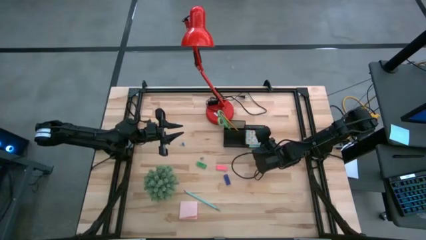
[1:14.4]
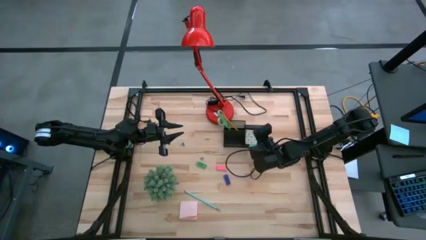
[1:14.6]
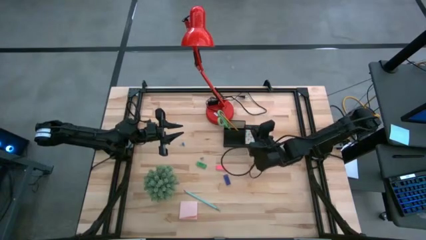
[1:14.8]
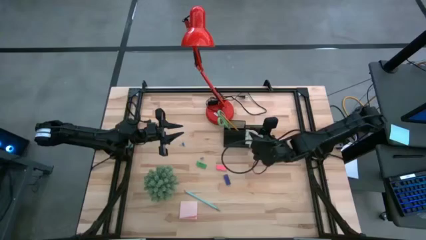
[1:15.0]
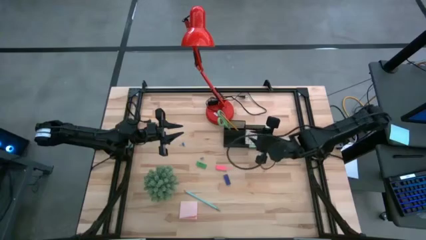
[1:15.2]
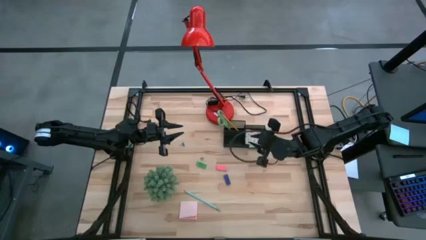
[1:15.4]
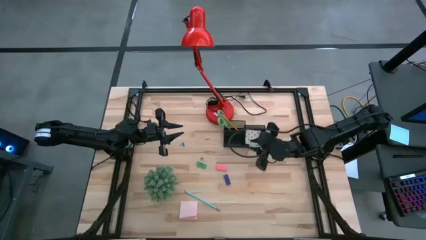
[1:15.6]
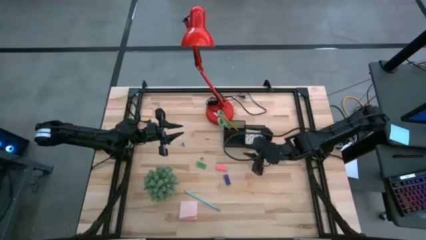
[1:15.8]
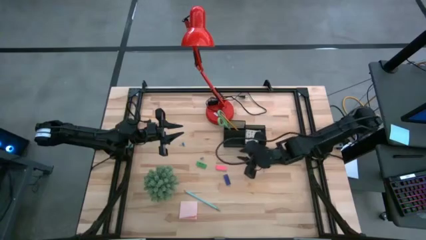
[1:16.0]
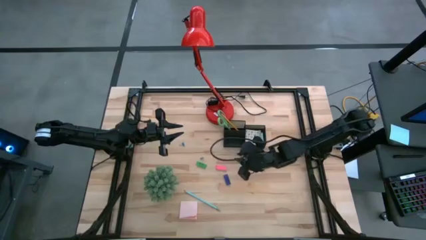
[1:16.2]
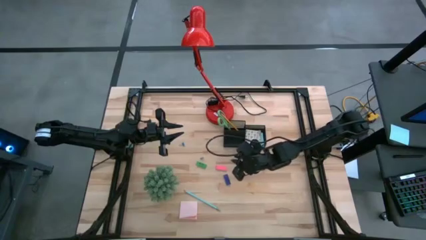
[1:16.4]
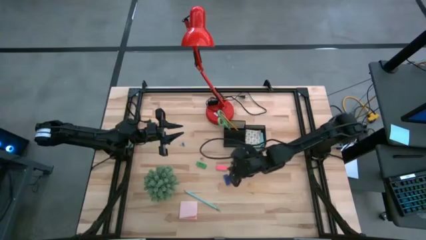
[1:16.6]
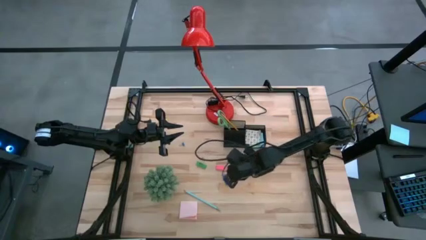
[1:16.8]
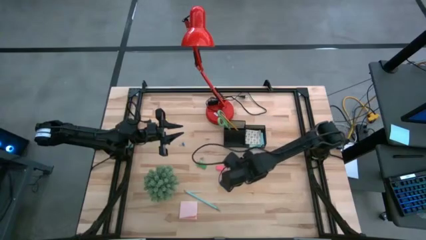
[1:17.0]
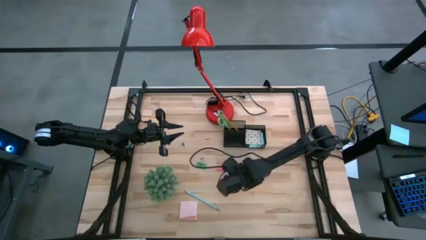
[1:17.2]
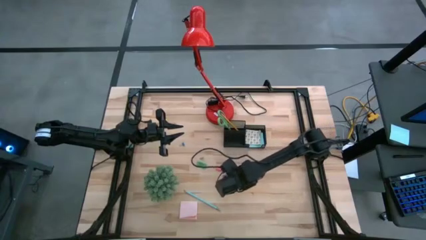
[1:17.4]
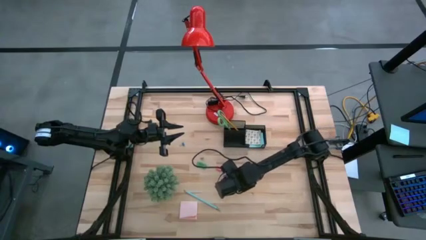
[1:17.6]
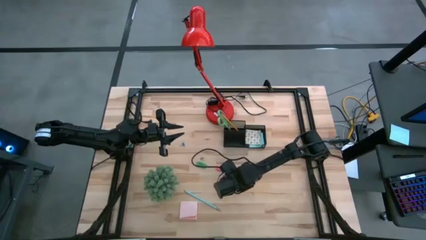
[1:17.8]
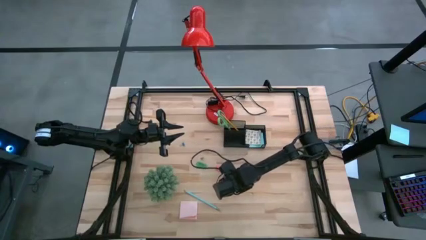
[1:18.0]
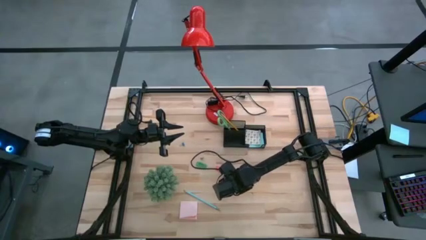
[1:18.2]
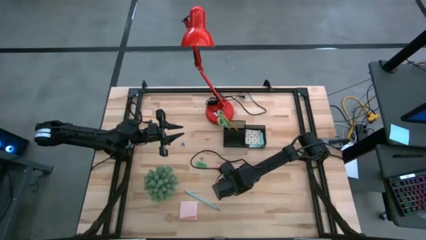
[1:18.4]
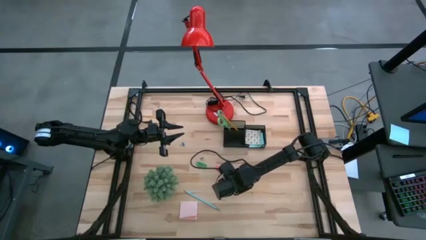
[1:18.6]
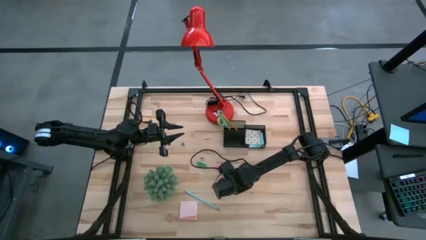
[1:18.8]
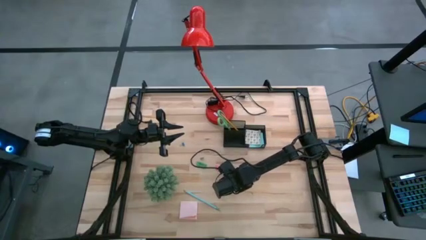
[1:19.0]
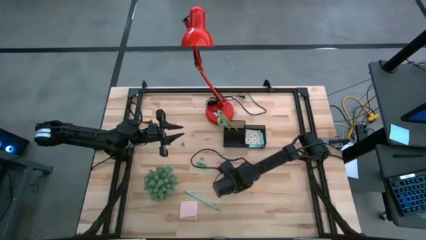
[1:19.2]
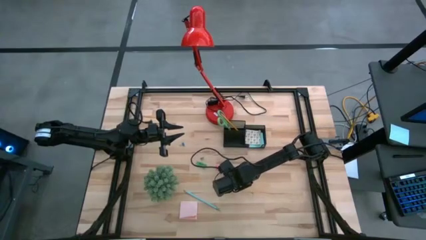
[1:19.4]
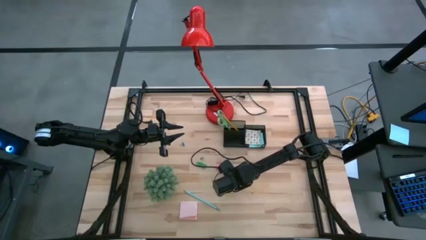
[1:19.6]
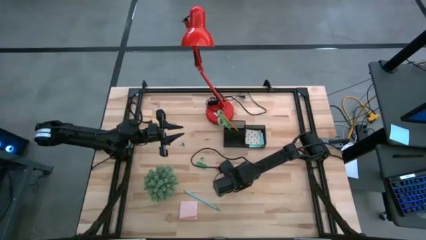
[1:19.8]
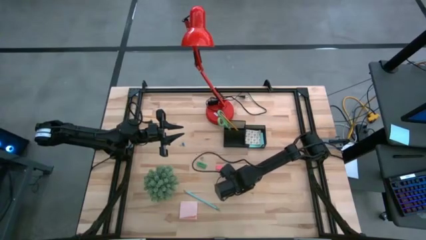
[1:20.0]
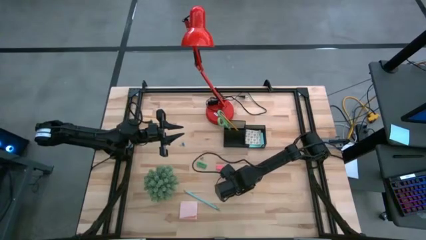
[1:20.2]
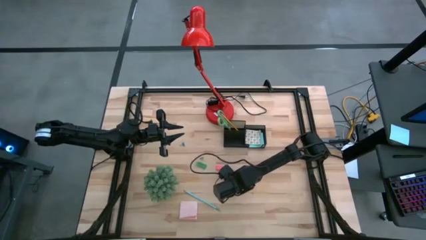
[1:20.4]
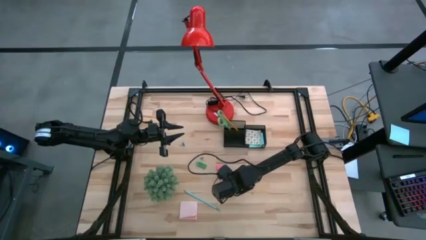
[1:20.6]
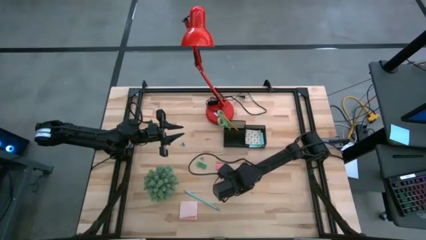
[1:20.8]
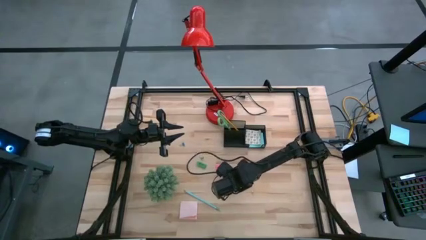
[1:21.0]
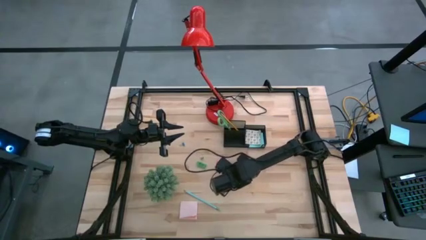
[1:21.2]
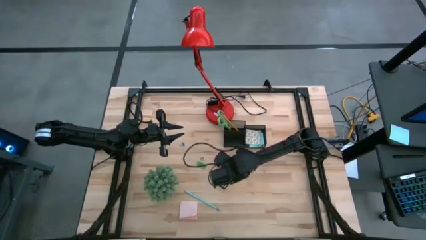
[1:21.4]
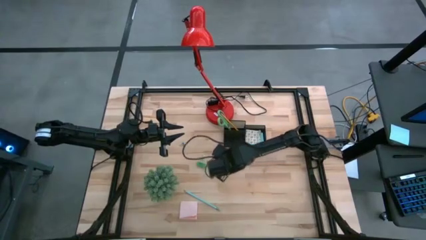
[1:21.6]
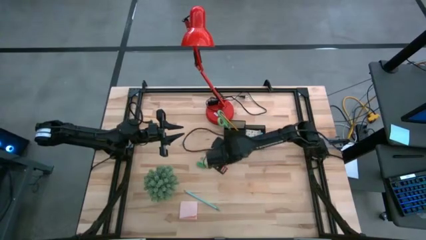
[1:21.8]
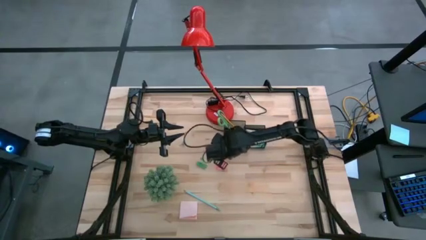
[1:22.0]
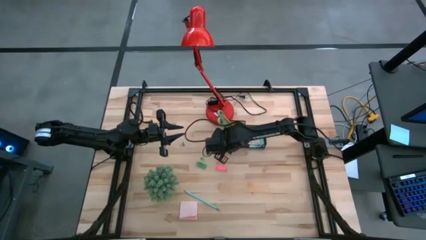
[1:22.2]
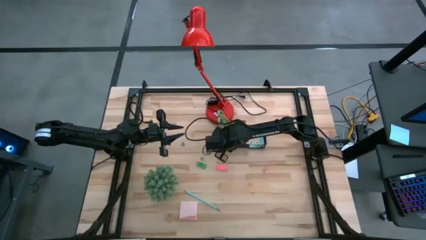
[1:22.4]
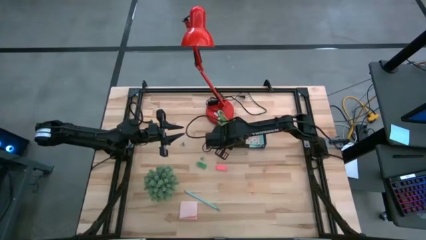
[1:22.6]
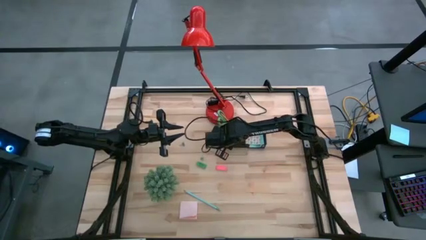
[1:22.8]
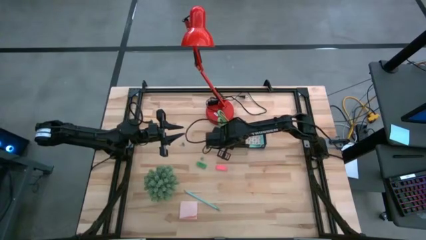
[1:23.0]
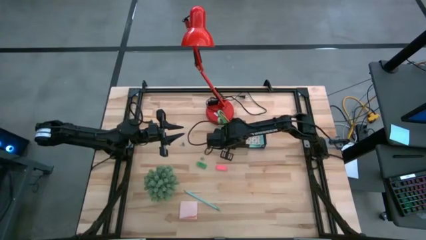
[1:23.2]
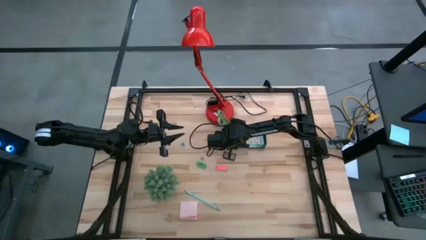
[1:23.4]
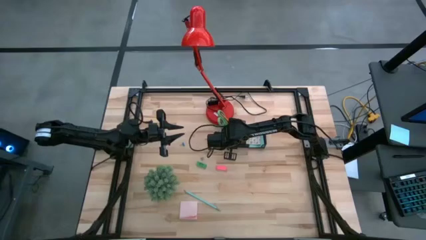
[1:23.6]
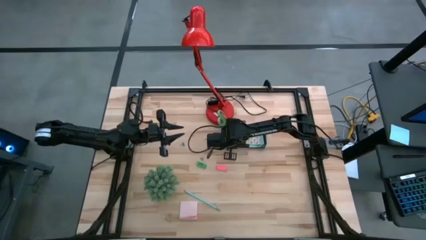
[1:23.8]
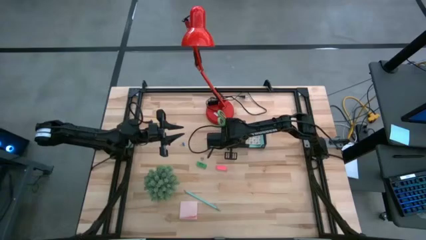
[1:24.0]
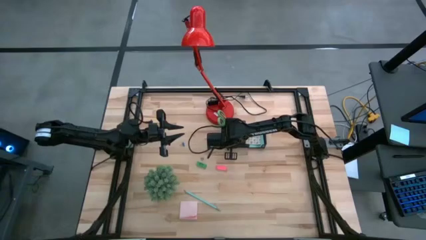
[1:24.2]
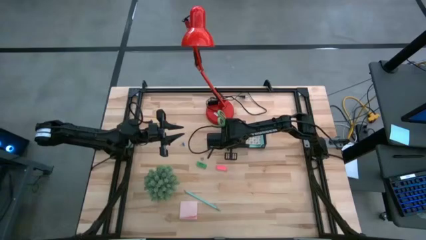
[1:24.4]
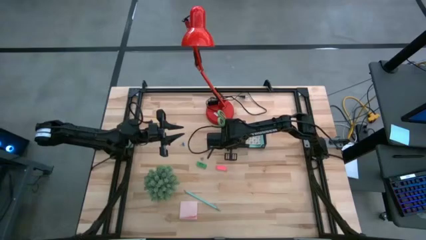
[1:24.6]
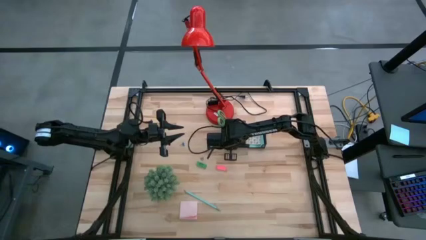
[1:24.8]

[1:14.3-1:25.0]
Task: Pick and place office supplies into organizer
Put the blue eraser into the front left compartment of the desk organizer

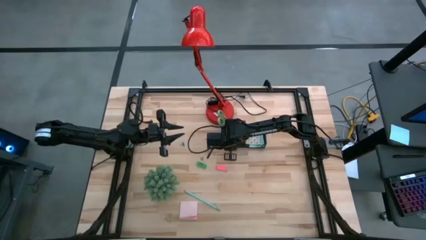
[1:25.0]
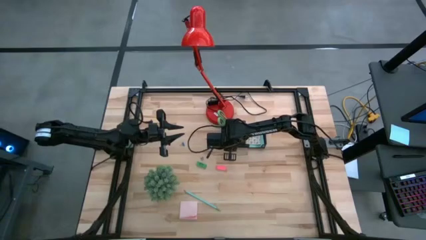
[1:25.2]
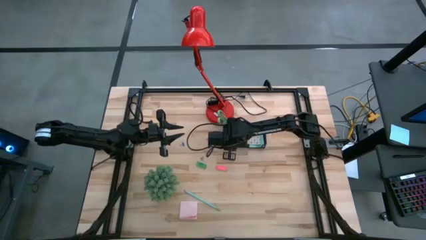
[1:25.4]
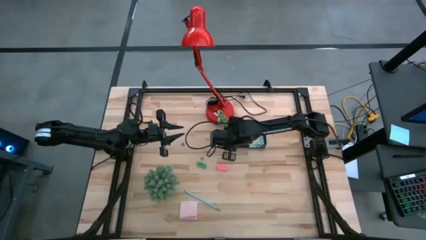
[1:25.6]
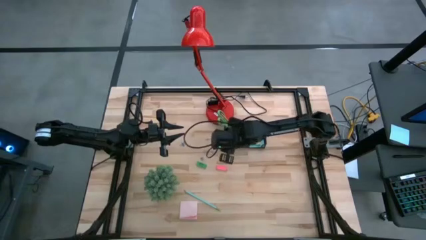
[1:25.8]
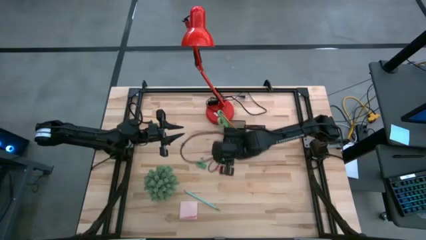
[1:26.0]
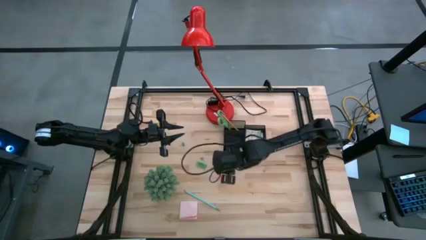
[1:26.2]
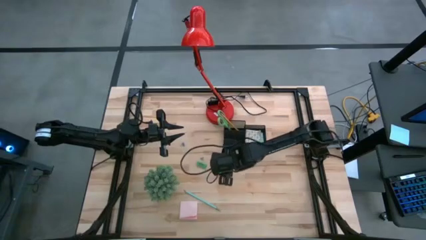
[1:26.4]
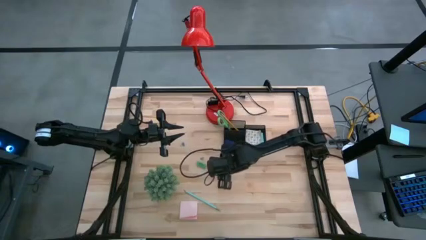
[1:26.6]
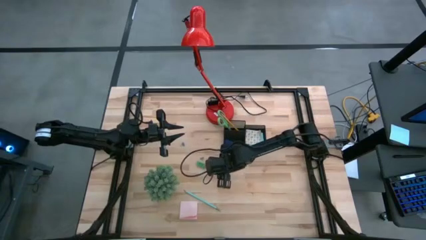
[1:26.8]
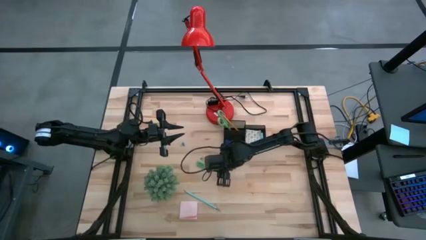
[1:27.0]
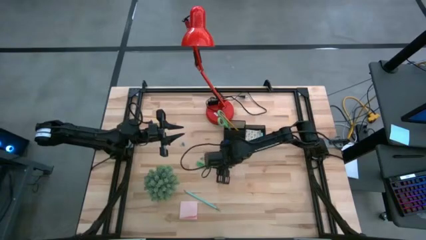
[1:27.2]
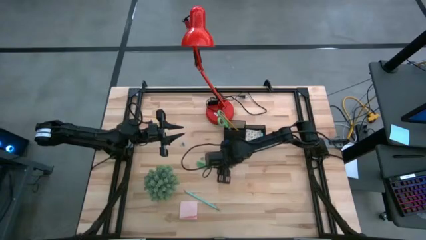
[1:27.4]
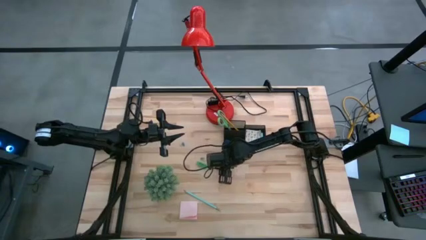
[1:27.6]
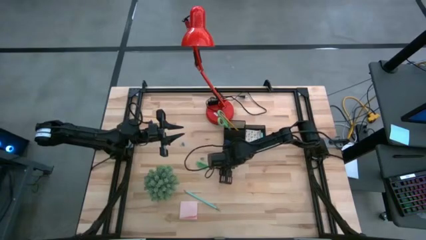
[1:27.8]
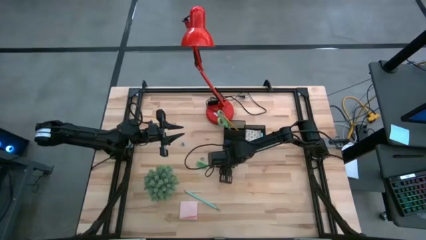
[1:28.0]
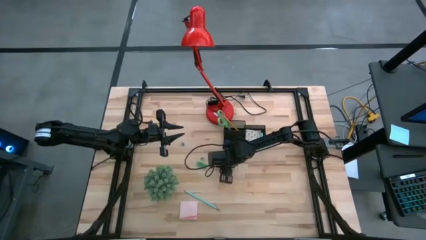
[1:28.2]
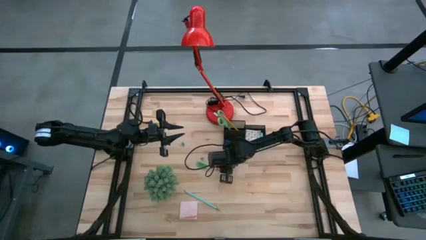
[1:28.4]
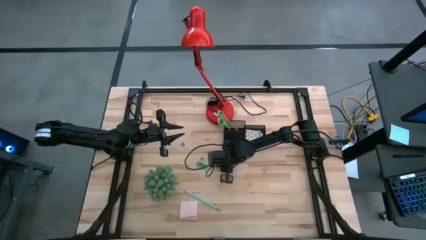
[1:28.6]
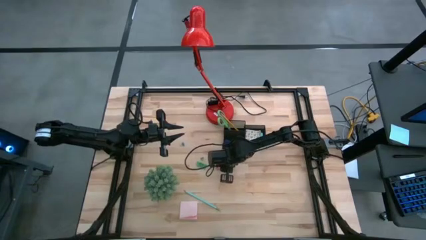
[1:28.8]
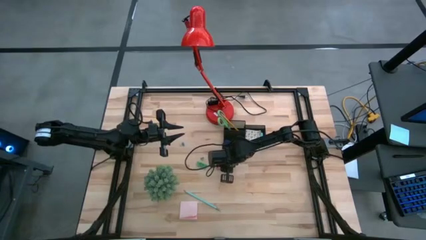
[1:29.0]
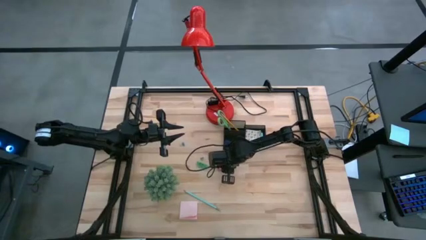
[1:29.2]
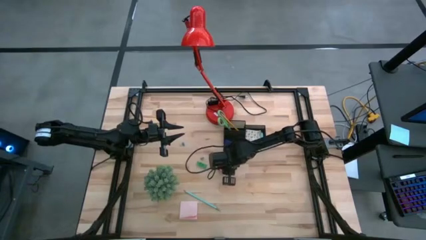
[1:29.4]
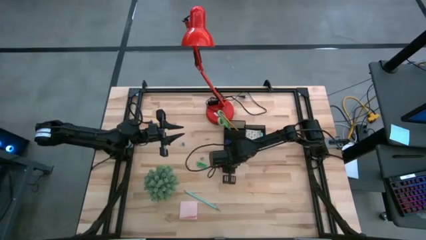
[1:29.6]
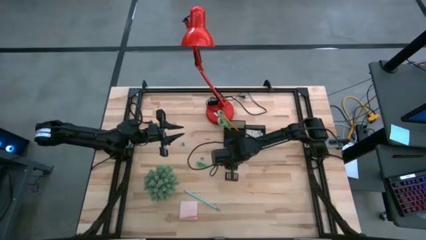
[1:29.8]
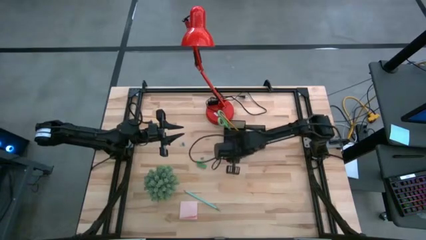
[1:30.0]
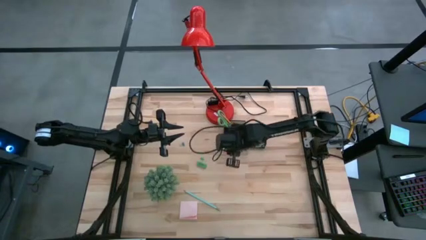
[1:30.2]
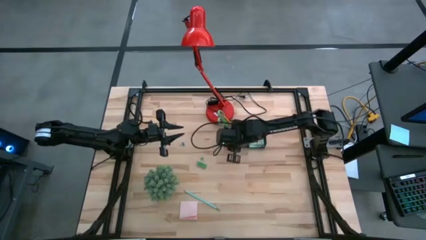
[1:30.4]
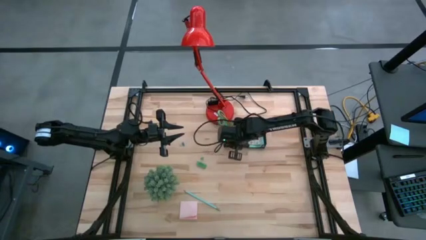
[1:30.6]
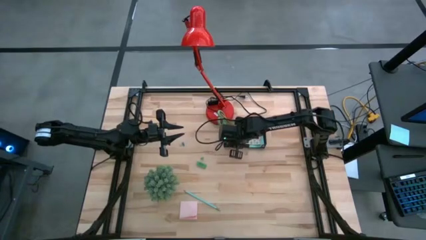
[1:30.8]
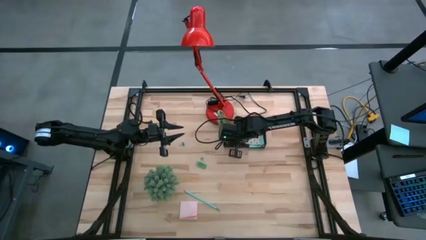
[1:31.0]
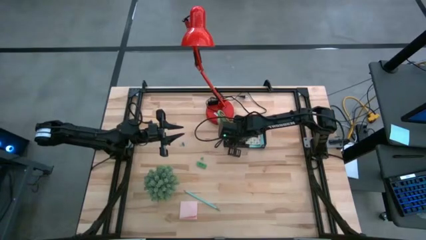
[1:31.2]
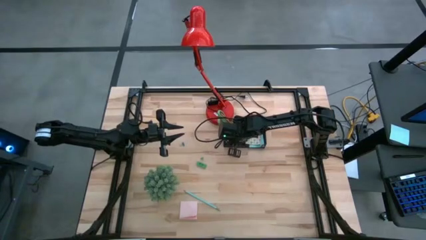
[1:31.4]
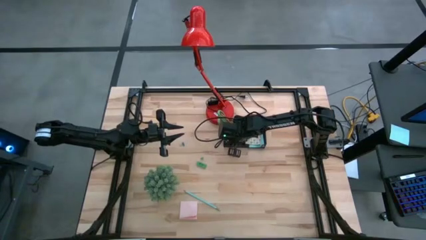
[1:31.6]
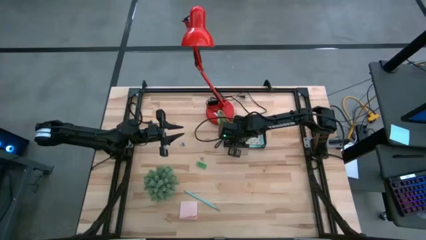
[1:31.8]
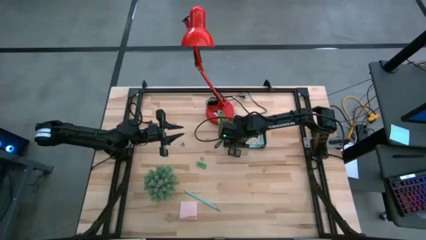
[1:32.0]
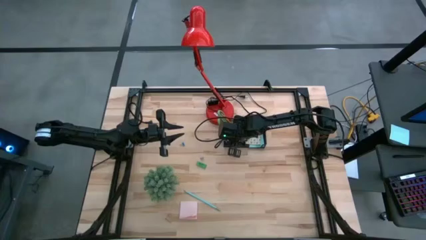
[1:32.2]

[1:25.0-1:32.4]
Put the pink eraser into the front left compartment of the desk organizer
